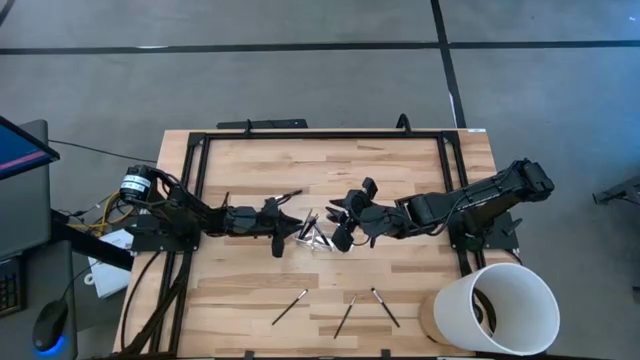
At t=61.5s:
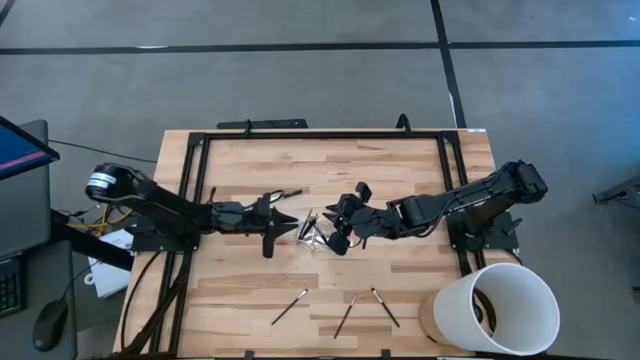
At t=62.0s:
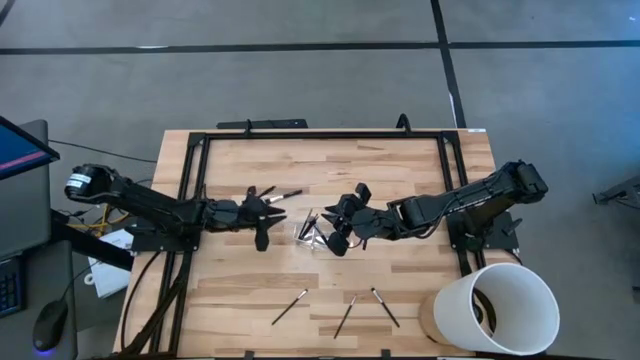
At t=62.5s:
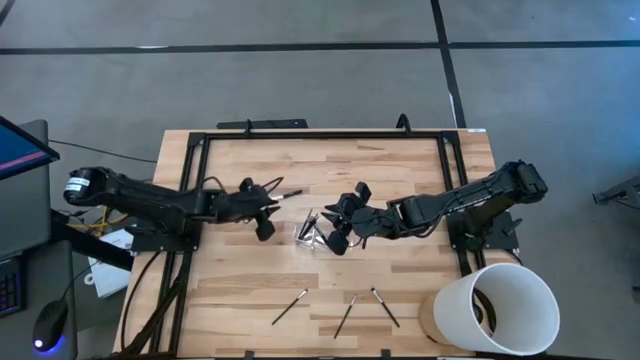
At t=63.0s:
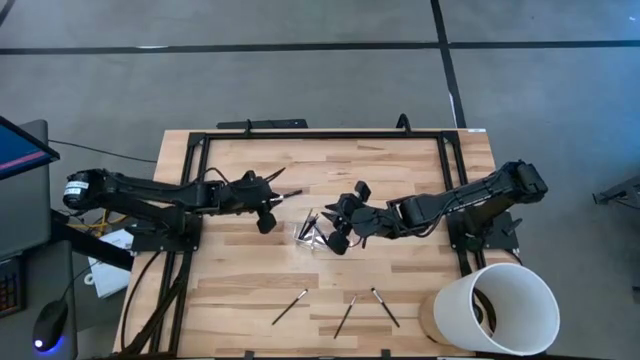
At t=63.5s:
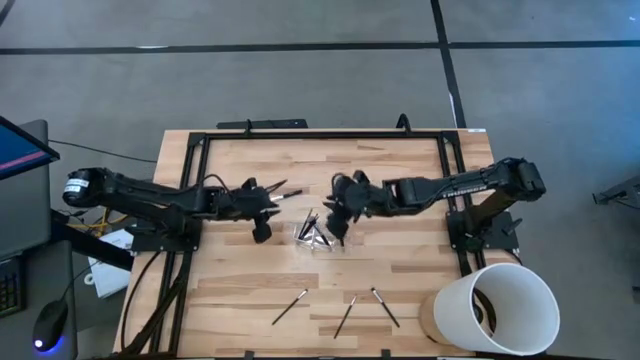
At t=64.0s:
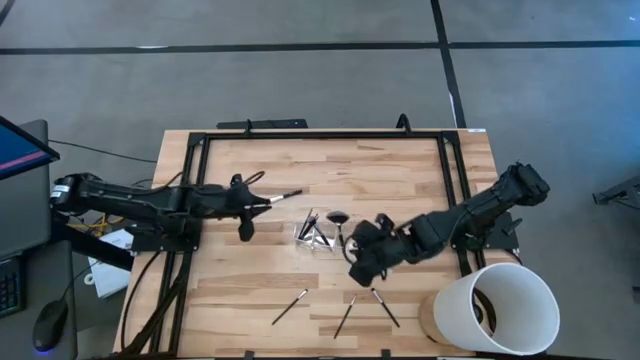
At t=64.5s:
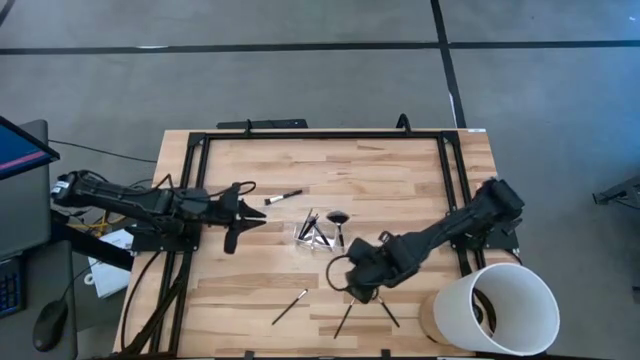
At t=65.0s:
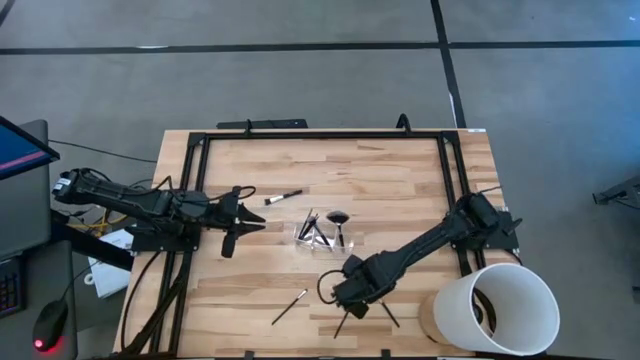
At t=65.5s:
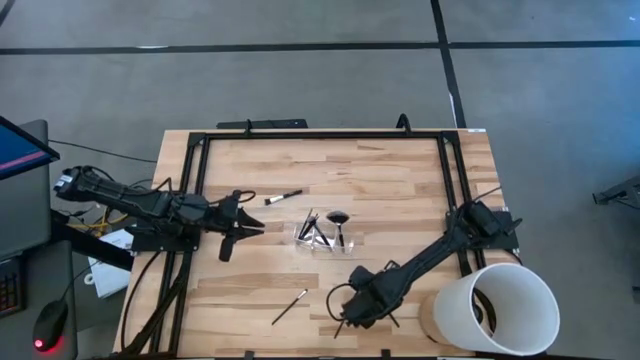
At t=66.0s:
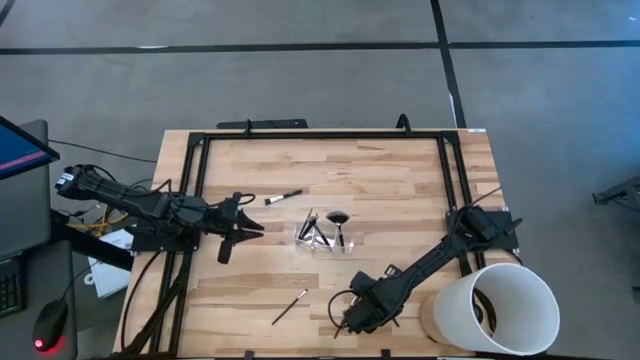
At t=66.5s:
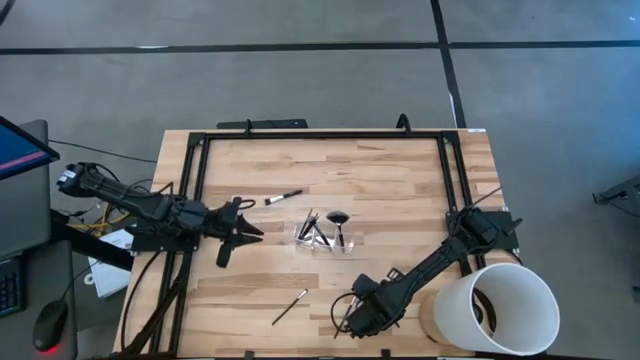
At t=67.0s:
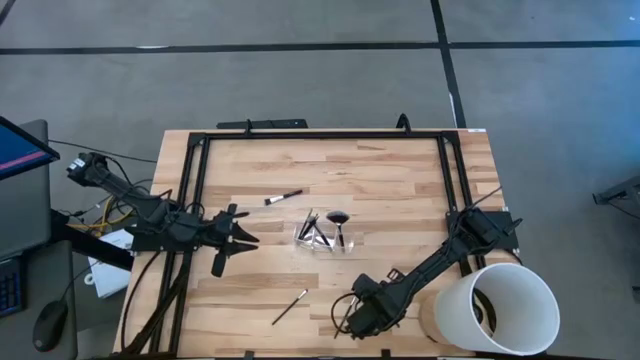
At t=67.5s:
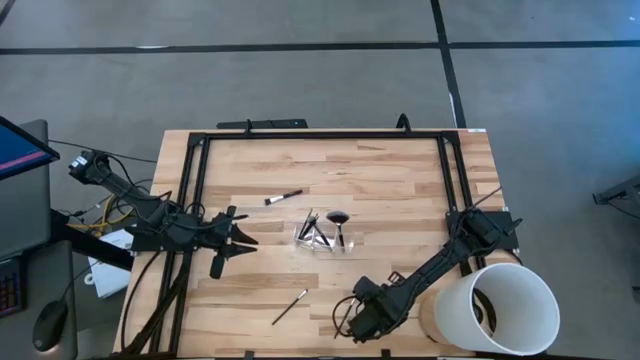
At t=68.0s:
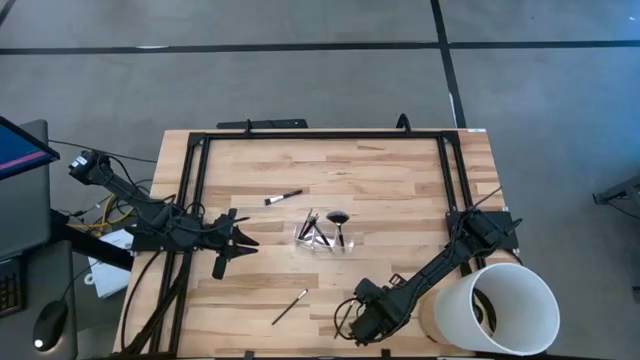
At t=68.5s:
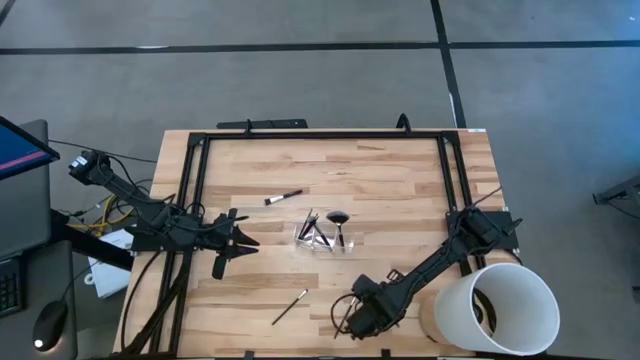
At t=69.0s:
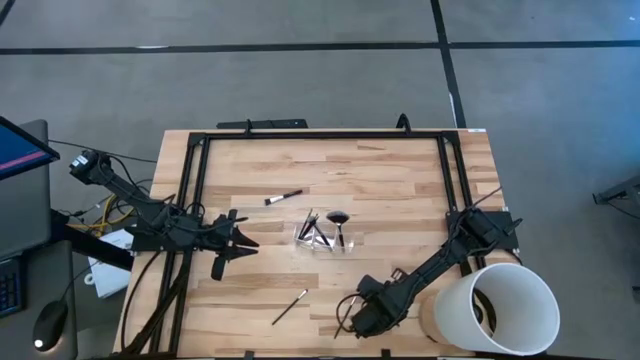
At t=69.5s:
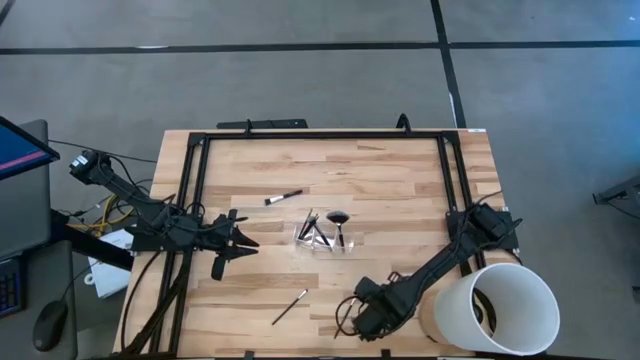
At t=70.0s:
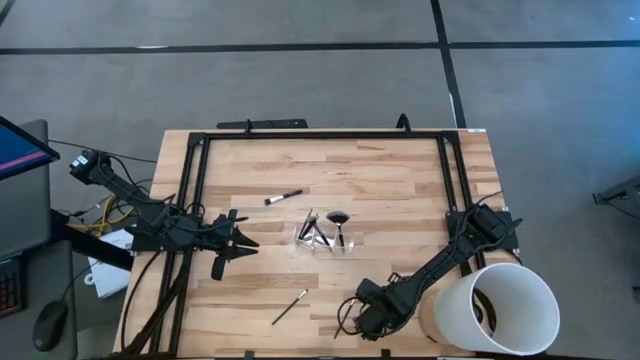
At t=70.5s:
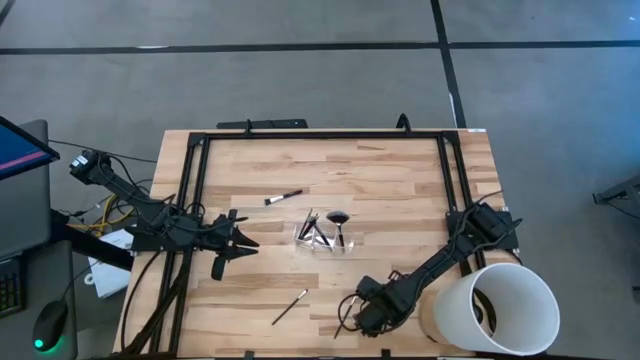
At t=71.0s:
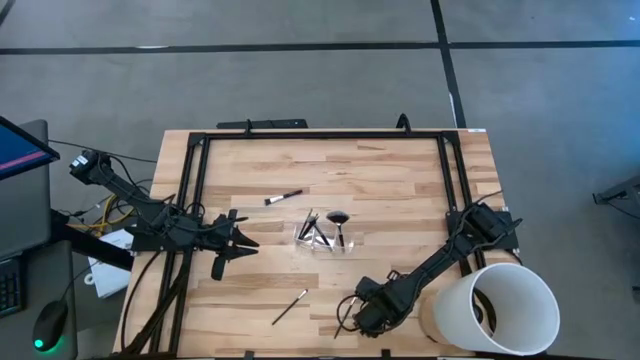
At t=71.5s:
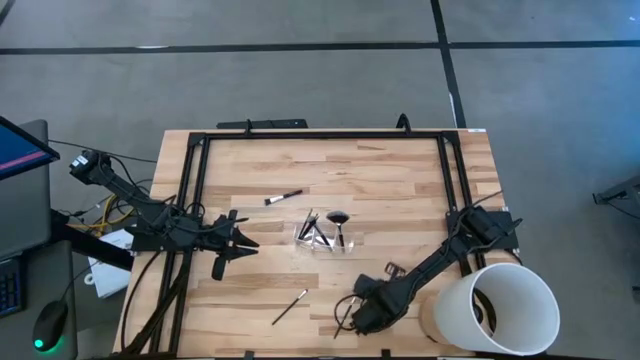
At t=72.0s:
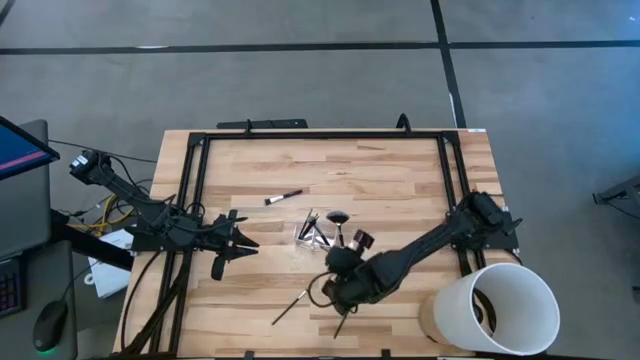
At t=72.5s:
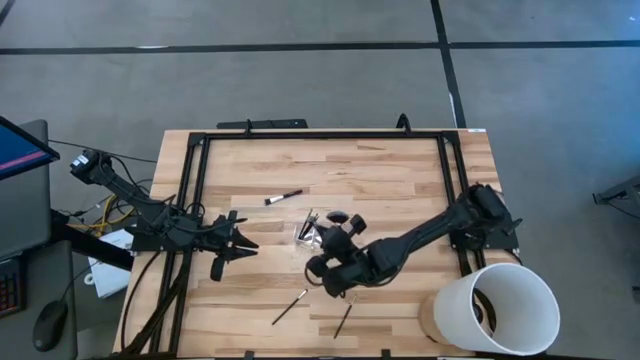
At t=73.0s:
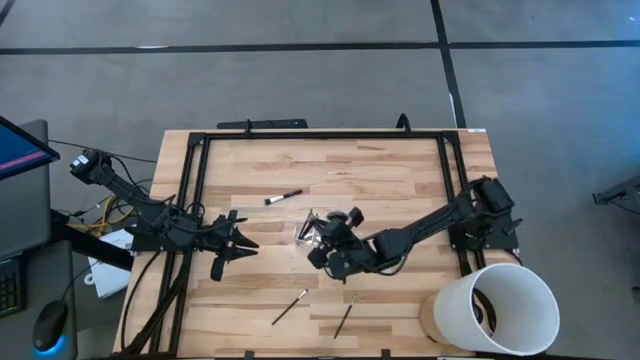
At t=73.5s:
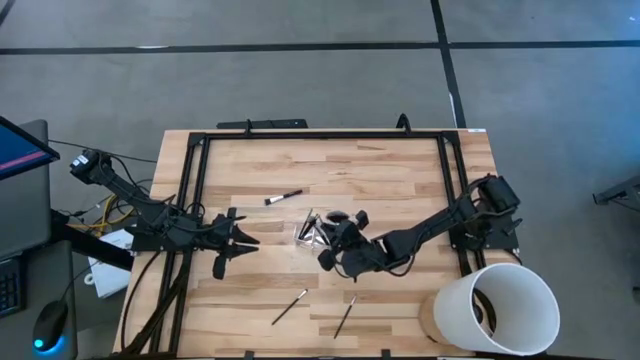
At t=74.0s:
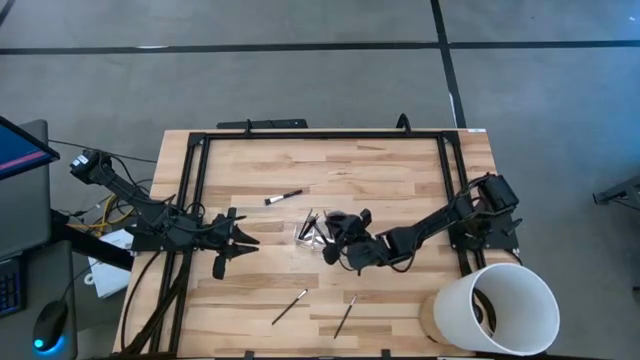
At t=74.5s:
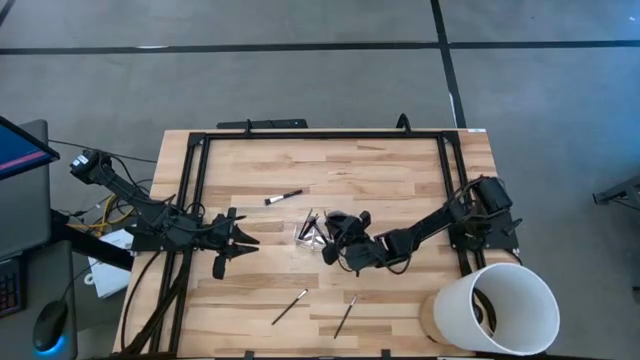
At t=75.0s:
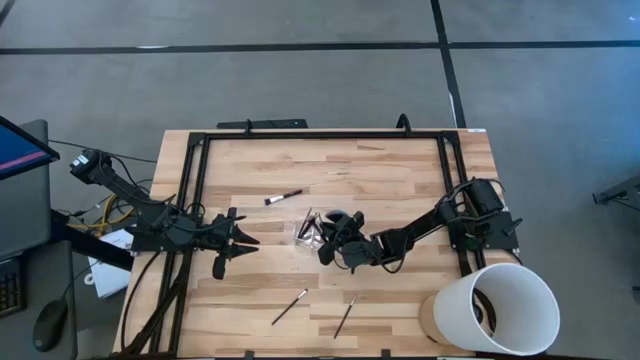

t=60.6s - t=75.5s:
Task: Put items in baskets/containers
Put the eyeshadow brush into the middle section of the transparent organizer

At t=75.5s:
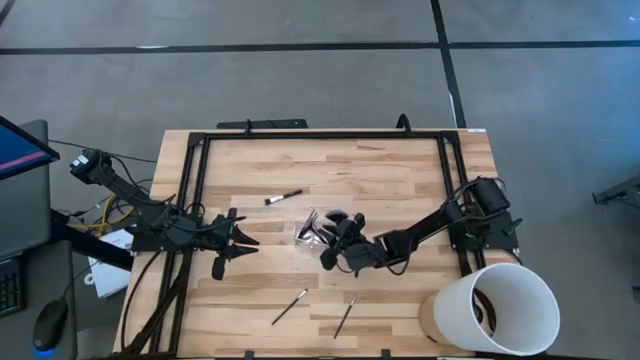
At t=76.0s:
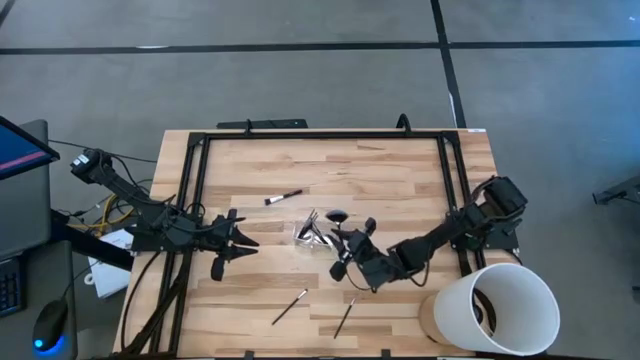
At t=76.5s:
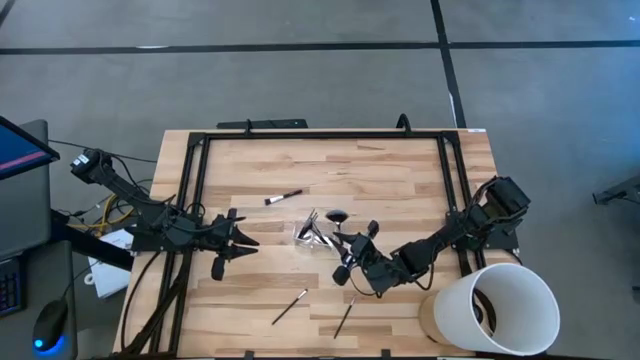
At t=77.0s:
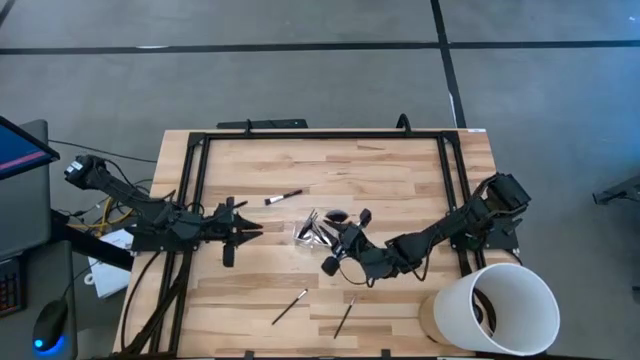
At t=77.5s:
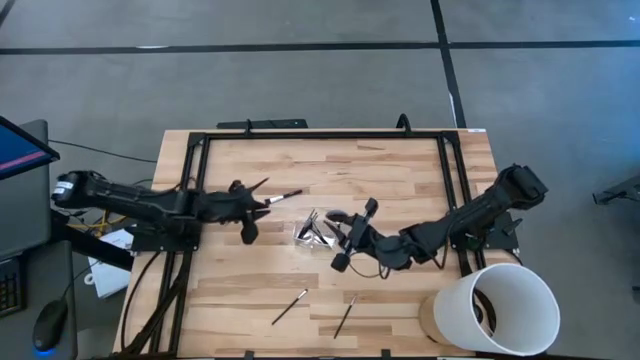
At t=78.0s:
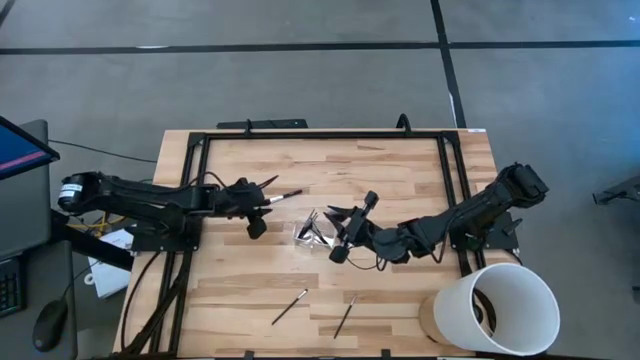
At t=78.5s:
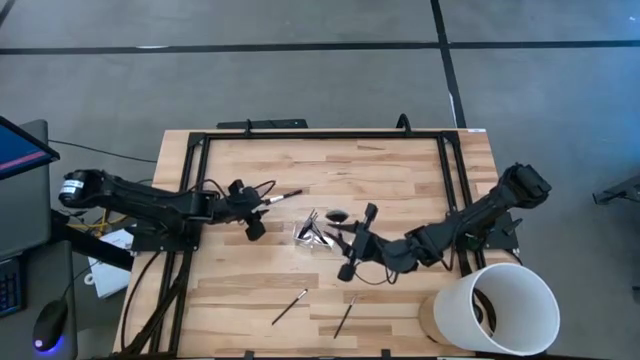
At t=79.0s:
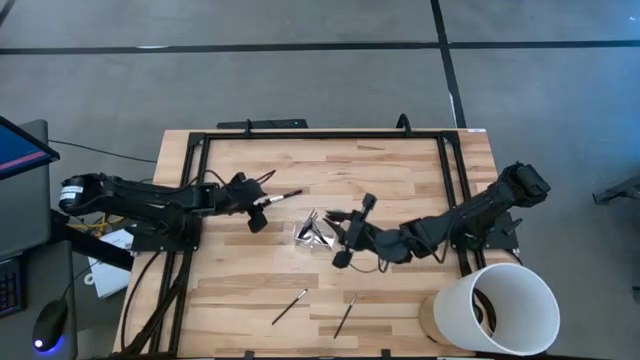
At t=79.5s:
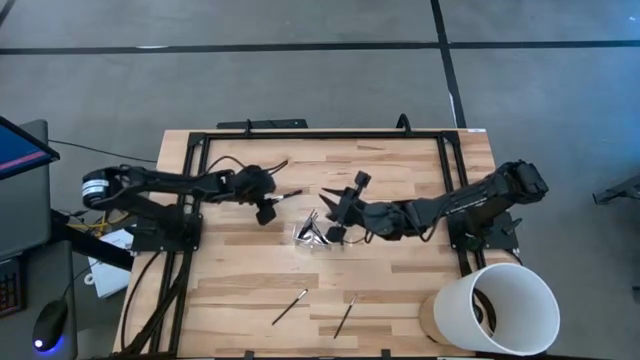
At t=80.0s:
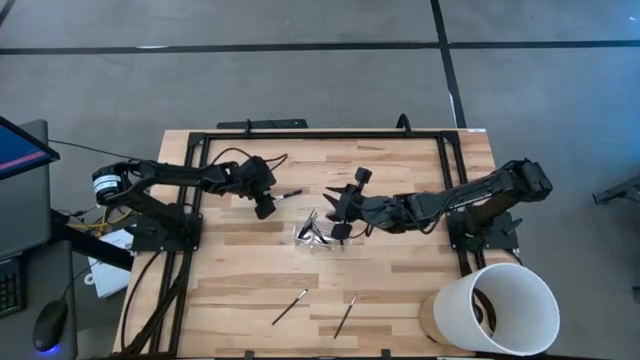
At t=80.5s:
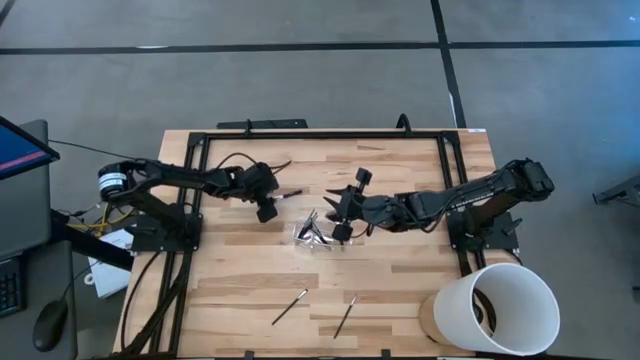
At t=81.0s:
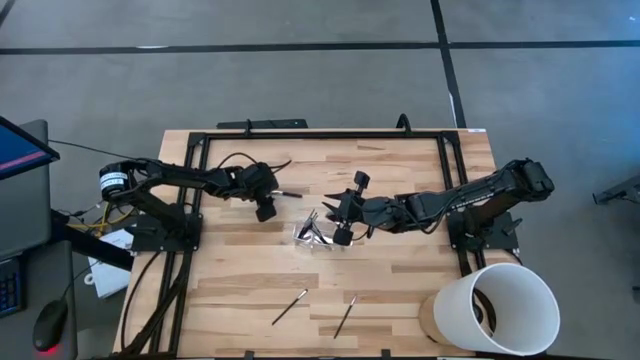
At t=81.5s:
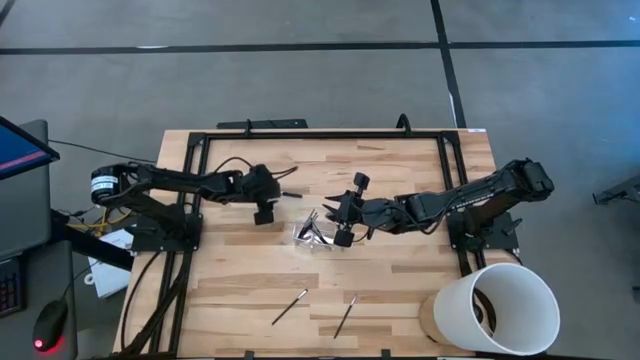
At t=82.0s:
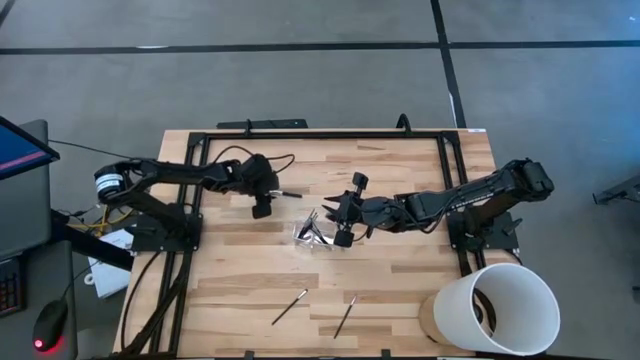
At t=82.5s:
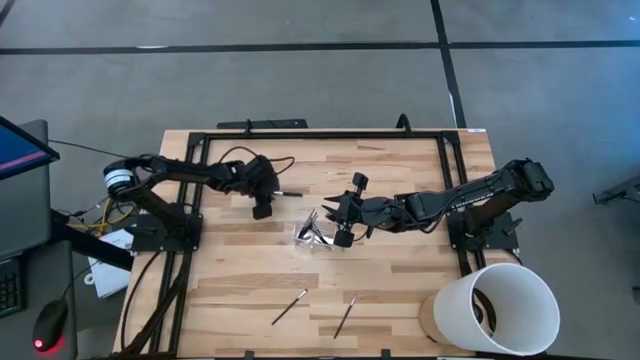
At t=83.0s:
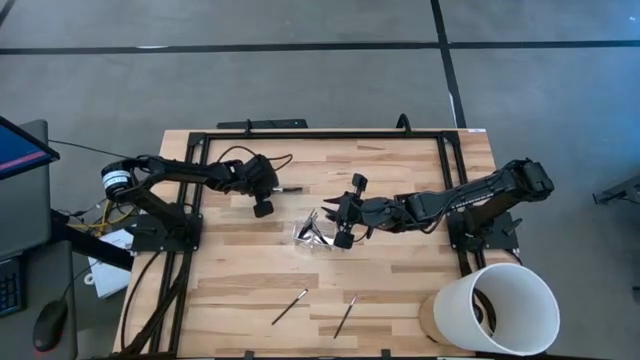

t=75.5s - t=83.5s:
Put the powder brush into the middle section of the transparent organizer
